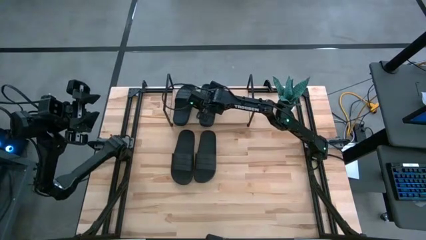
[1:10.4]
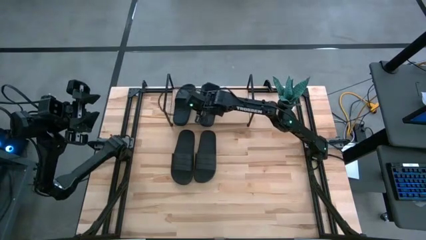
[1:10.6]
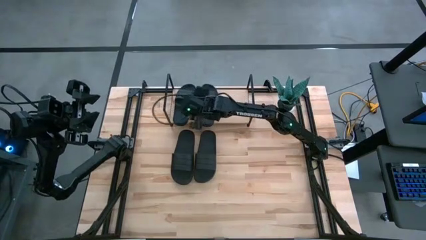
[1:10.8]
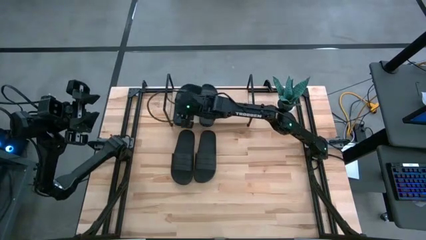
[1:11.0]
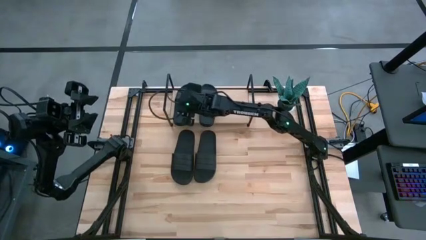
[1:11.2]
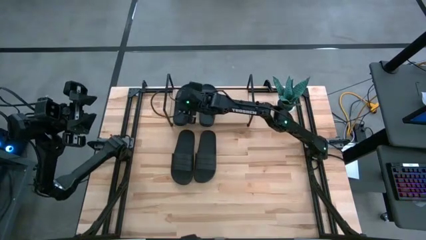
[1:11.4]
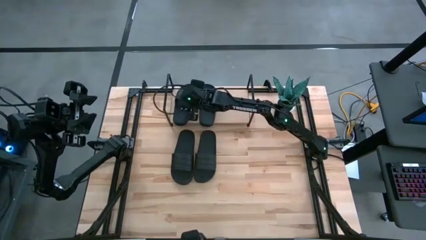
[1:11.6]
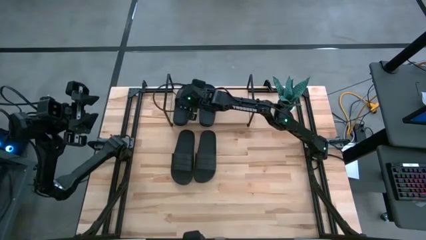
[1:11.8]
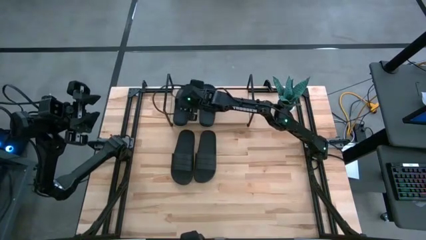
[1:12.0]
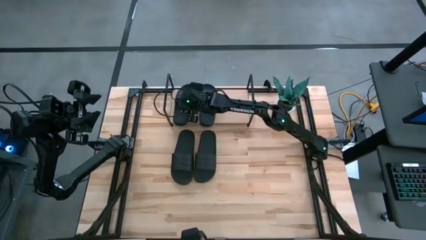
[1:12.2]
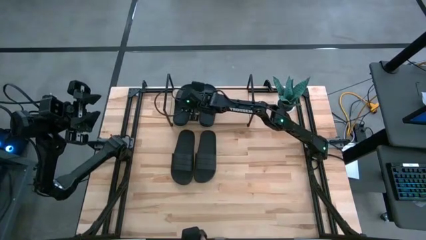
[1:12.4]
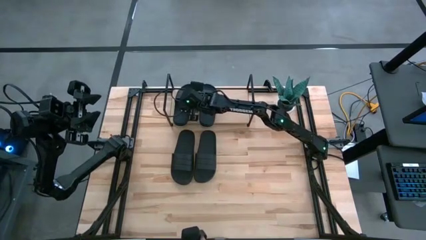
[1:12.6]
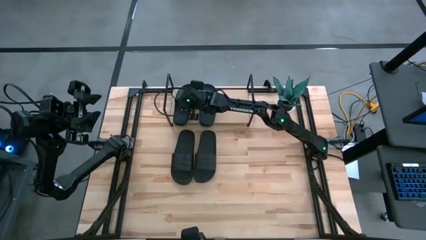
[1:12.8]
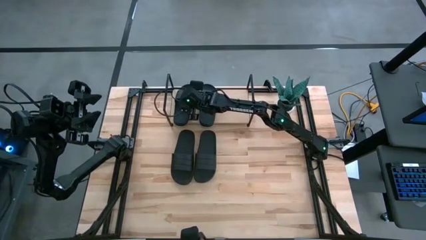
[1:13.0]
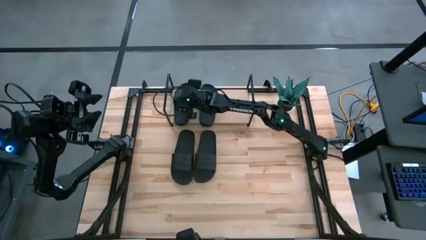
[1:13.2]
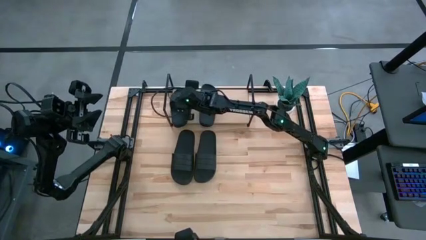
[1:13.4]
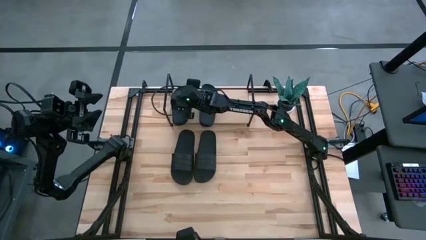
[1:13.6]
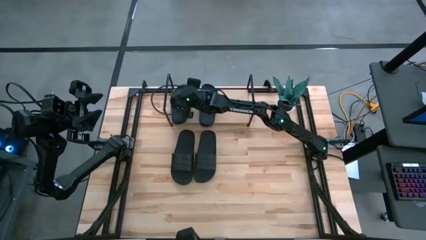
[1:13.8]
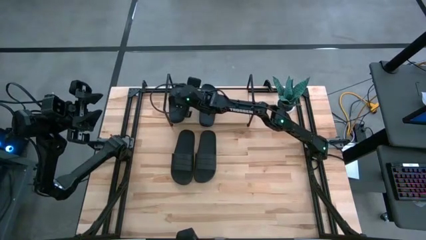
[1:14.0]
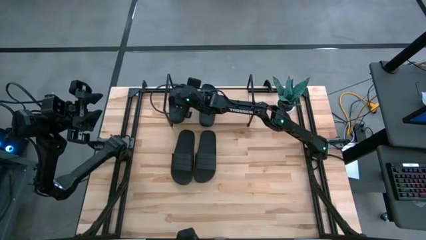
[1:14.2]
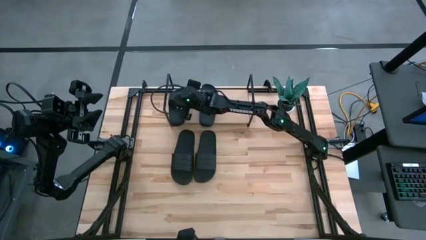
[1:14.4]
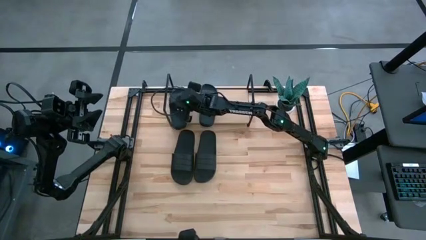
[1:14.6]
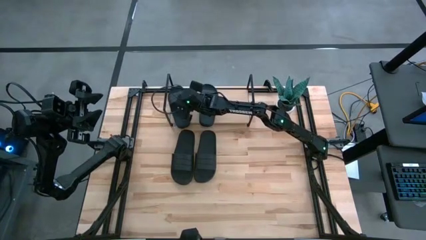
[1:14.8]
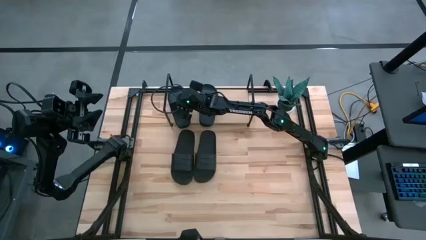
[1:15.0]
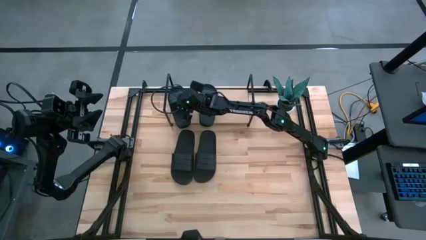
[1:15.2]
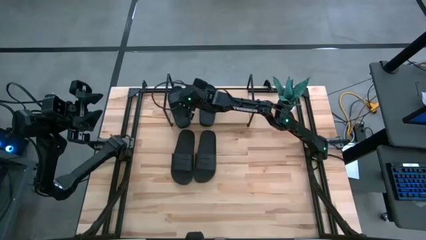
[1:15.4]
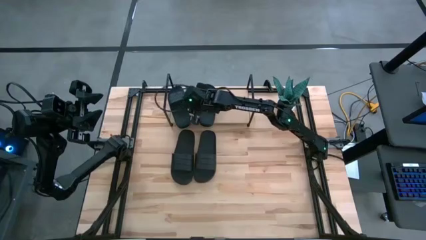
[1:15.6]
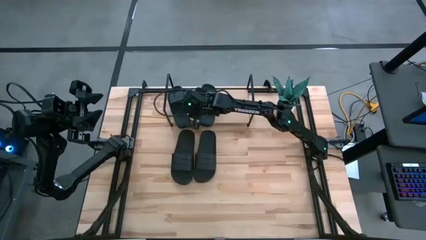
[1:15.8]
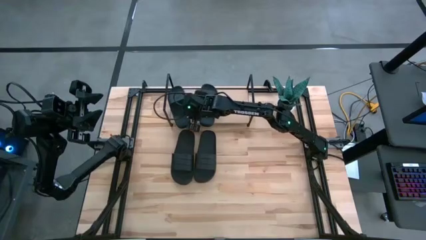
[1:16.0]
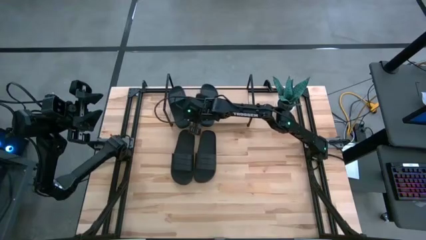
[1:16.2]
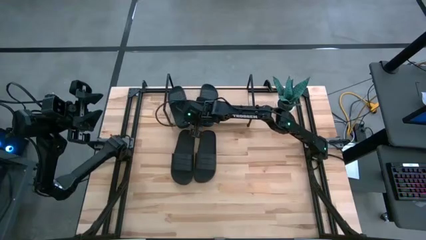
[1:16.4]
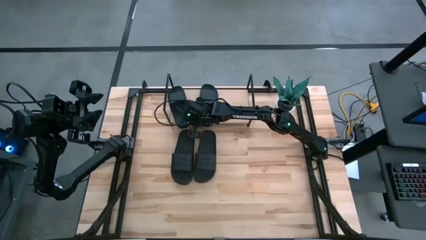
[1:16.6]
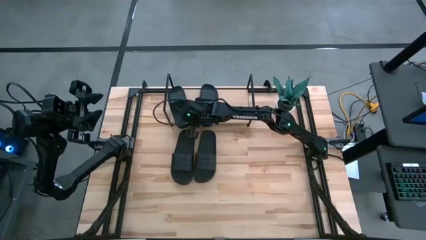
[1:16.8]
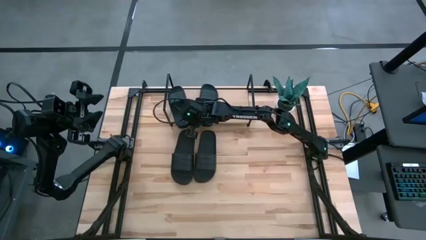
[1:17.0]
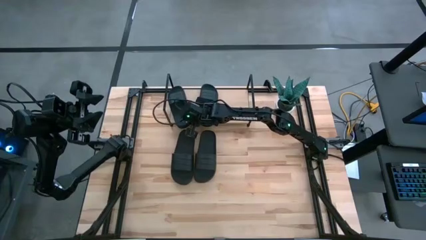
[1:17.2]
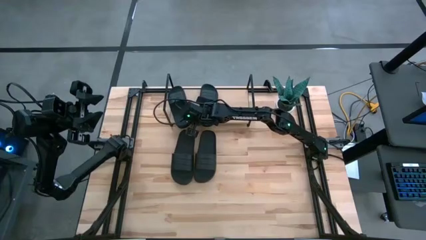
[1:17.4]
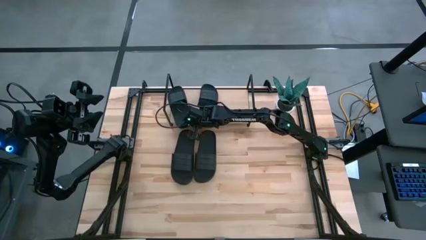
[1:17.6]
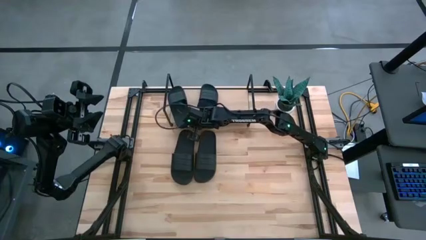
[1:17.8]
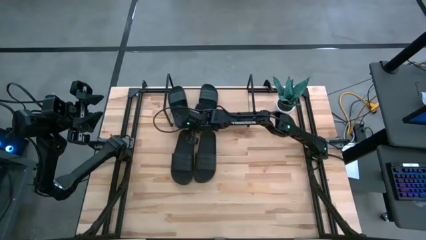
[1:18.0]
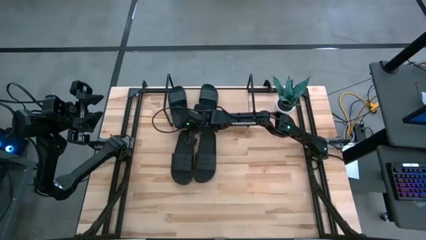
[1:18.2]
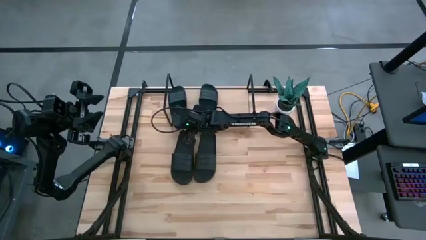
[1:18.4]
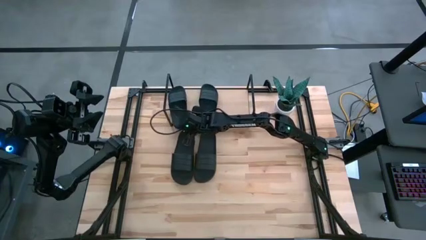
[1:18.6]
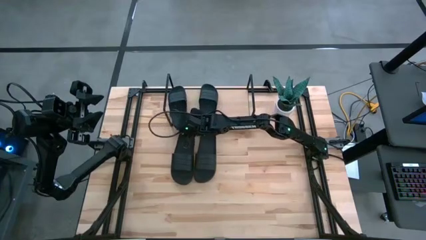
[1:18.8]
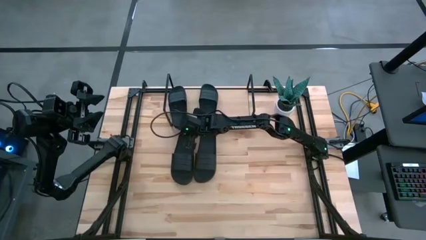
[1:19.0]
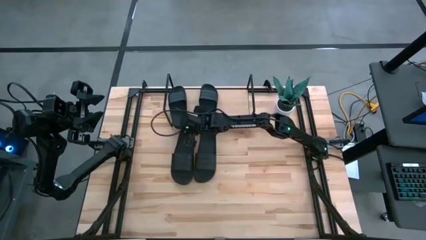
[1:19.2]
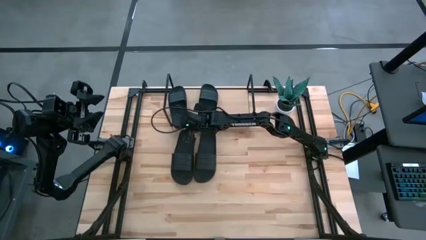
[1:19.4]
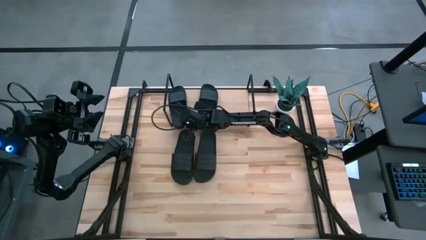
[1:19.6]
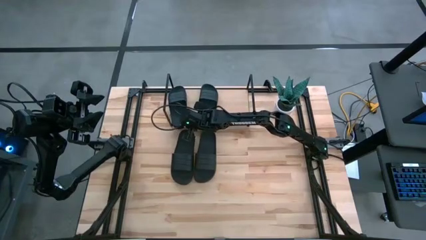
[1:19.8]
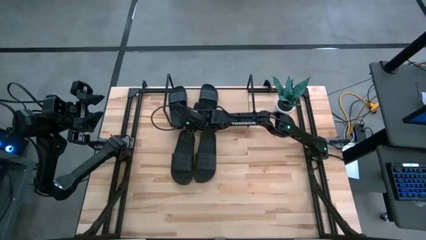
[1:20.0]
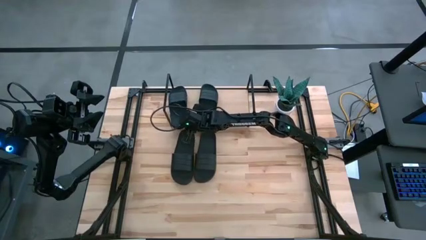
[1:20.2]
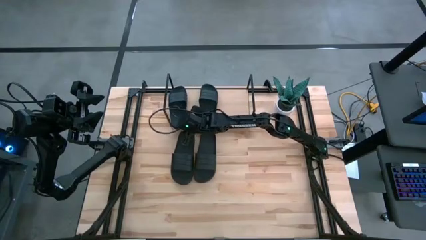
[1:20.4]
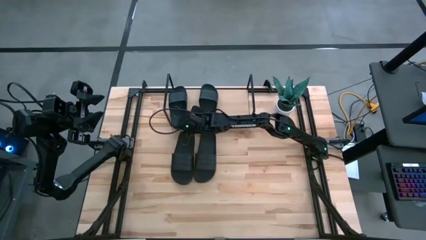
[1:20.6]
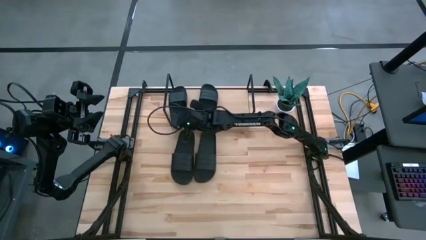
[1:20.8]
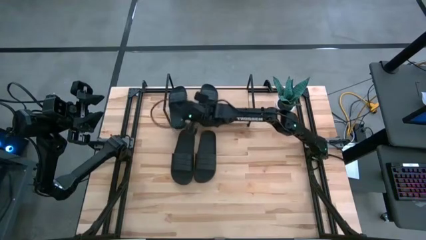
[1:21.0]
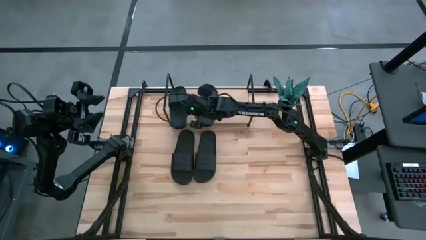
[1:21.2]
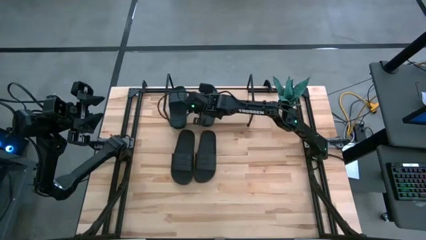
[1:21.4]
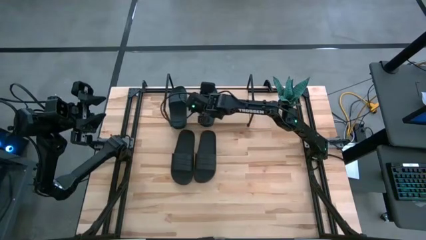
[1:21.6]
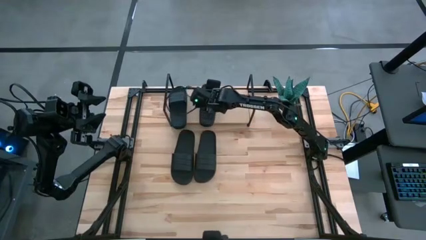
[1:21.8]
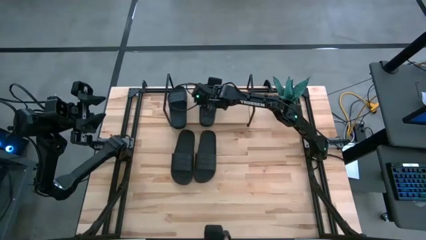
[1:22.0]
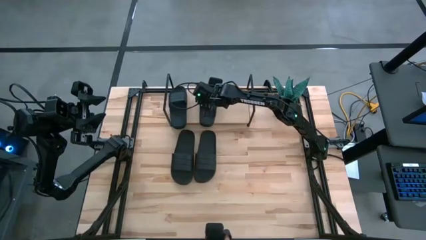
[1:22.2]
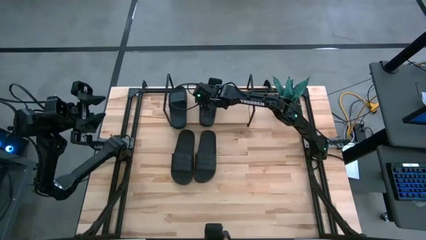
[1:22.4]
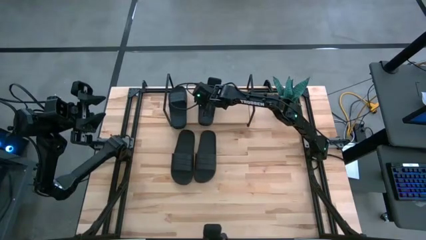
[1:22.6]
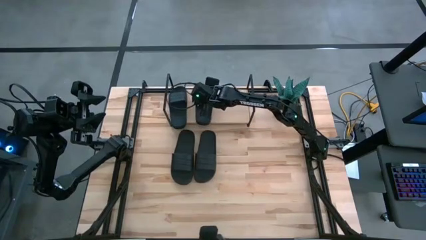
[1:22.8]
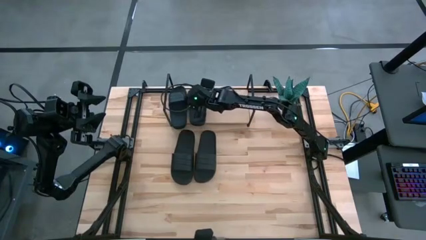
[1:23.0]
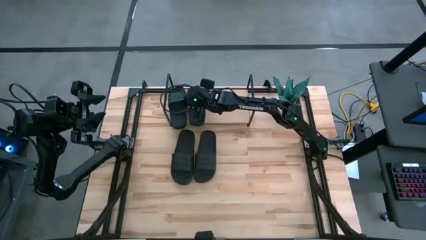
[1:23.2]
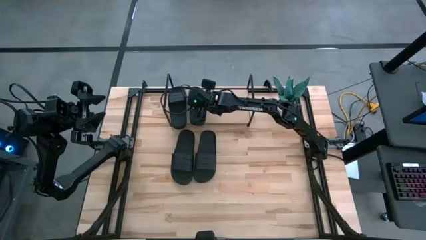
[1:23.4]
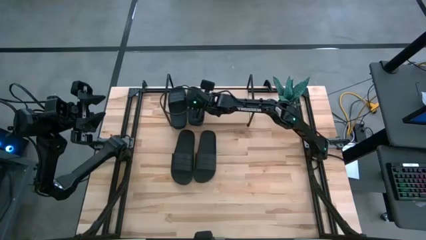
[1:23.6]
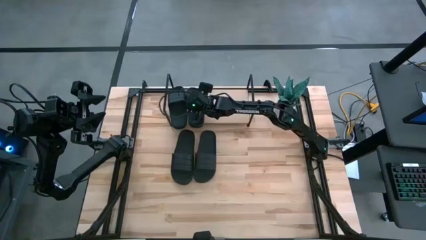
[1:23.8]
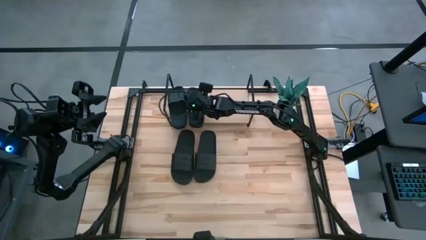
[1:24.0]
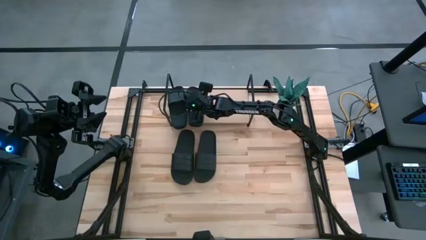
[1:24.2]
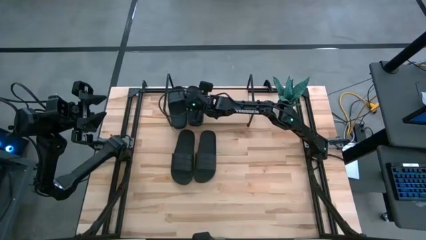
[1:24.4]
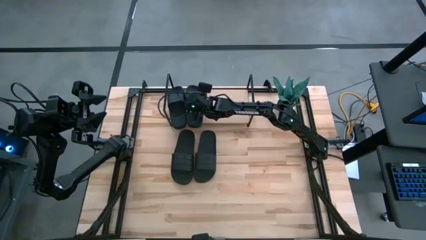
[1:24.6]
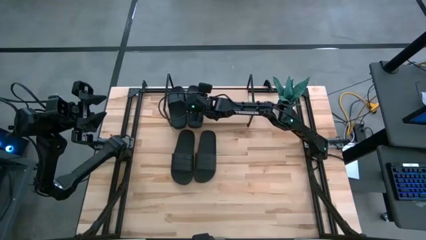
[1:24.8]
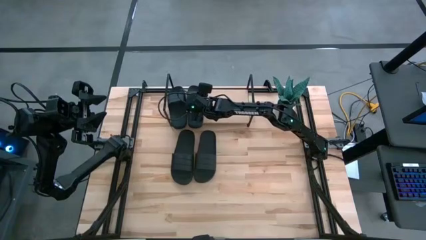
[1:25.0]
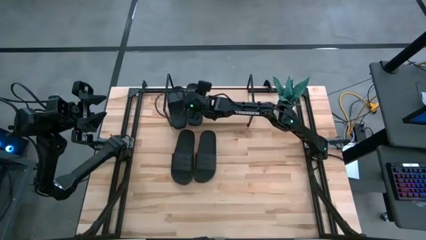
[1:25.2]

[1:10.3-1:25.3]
Task: Pick and place slides into the shelf
Adjust the black slides on the shelf

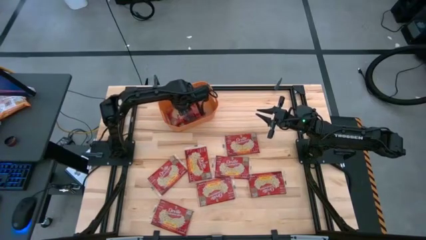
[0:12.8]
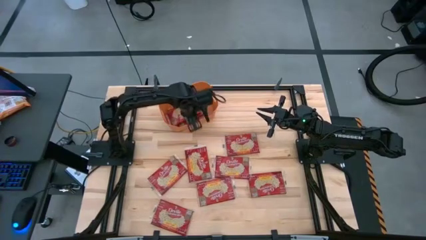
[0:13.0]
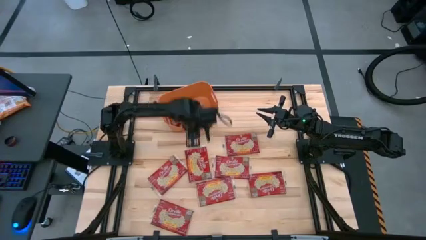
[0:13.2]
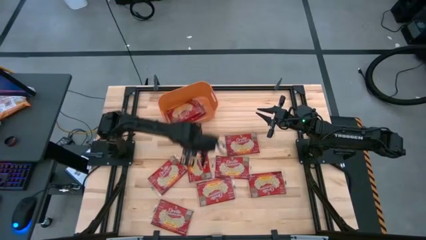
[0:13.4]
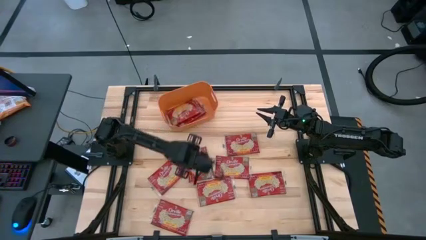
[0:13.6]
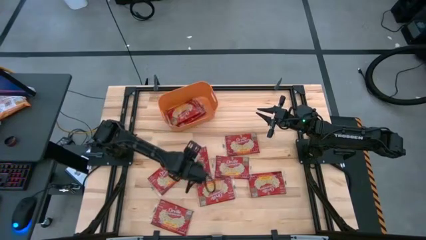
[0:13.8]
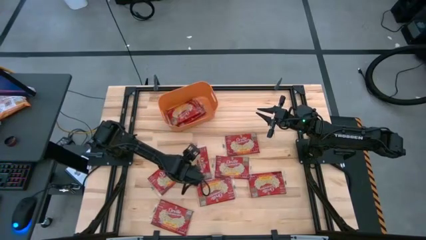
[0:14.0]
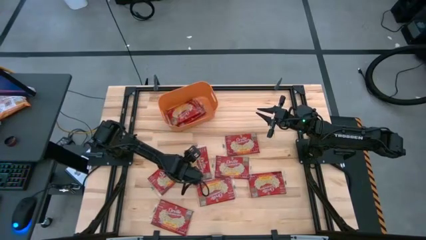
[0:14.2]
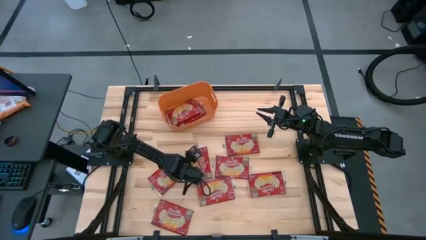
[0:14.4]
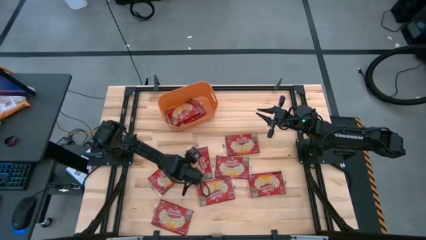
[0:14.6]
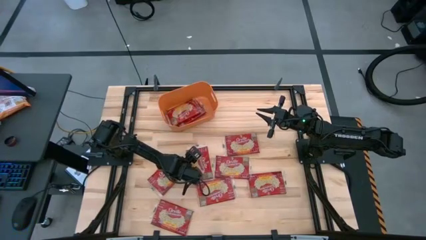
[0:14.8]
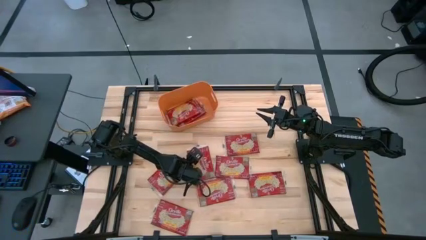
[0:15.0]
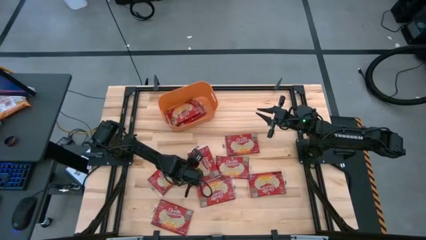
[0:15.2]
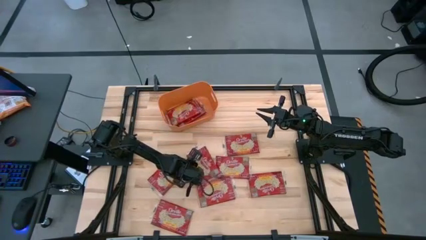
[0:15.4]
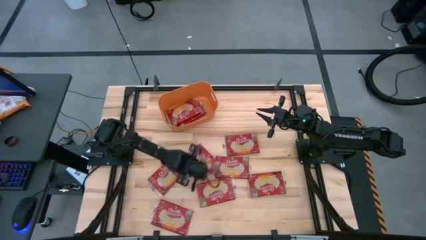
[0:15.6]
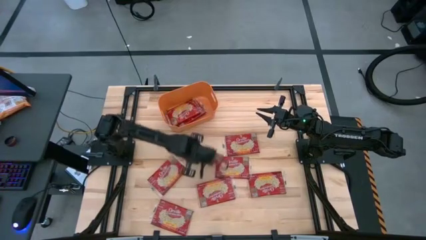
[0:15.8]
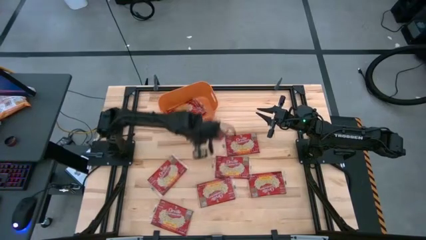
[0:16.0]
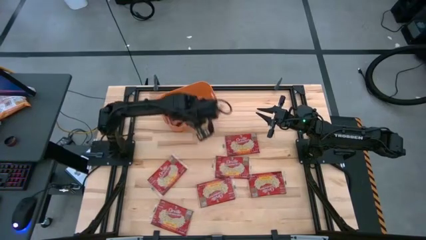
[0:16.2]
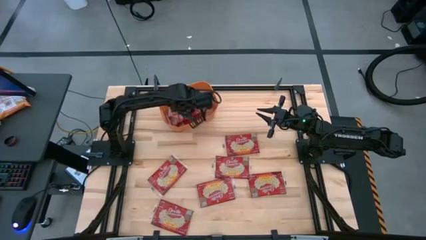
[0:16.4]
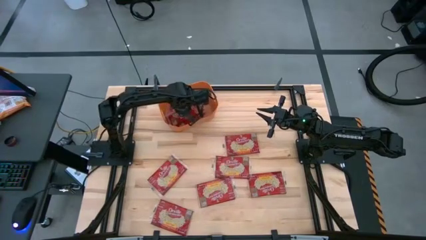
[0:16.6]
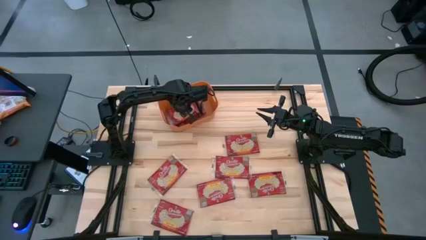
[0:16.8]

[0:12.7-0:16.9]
Task: Sort popcorn bags into baskets
Put the red popcorn pack into the orange bin
